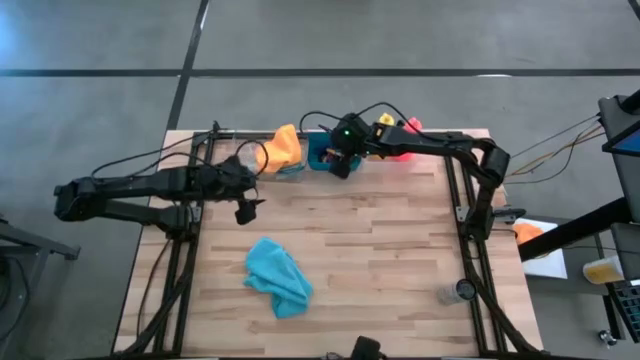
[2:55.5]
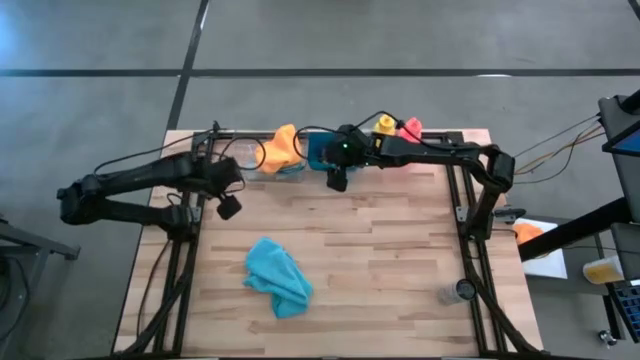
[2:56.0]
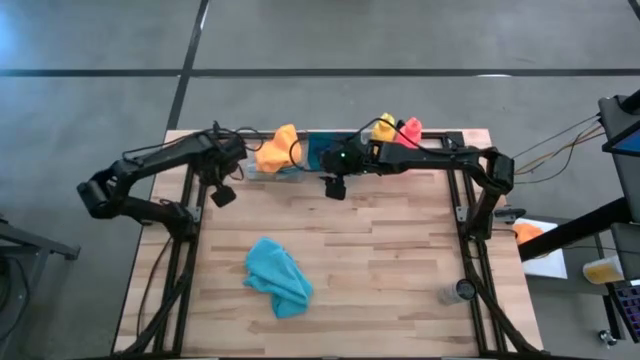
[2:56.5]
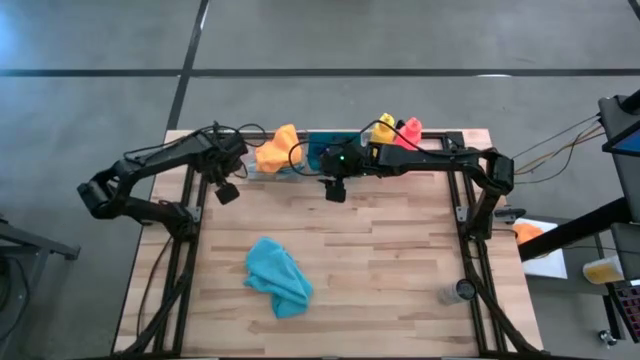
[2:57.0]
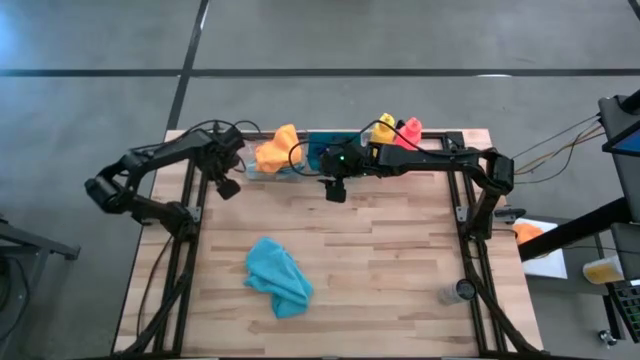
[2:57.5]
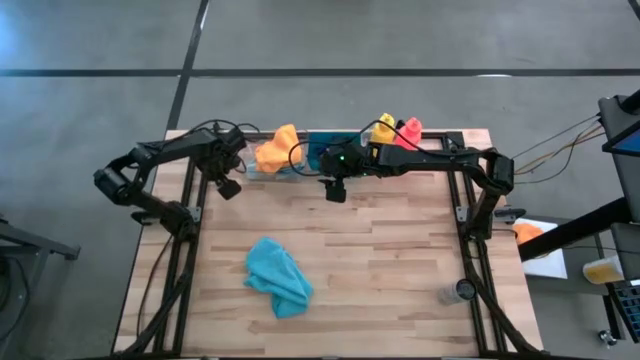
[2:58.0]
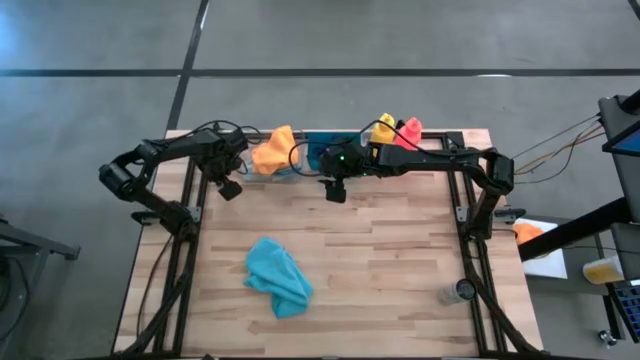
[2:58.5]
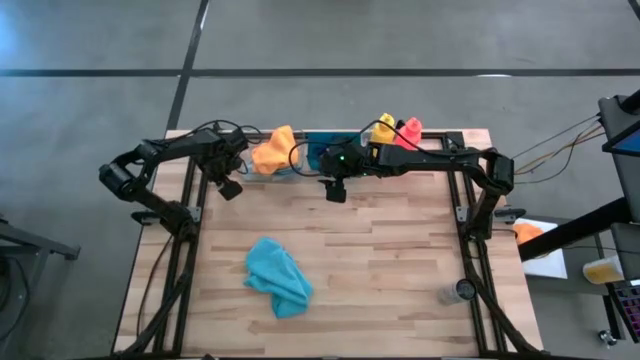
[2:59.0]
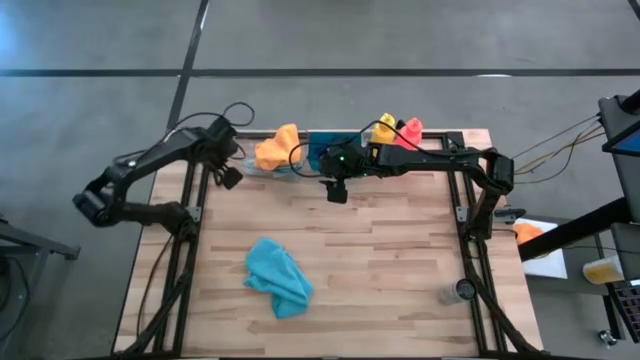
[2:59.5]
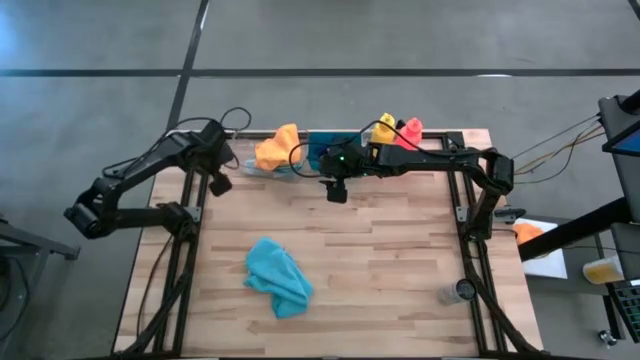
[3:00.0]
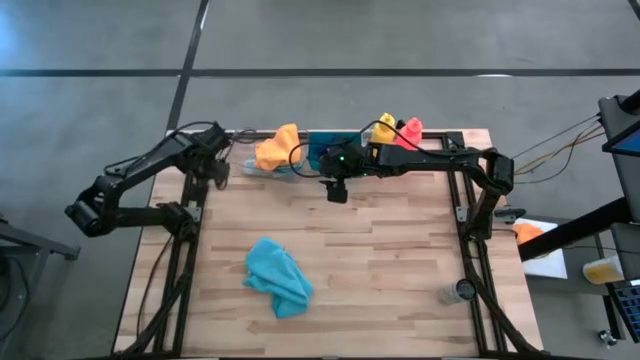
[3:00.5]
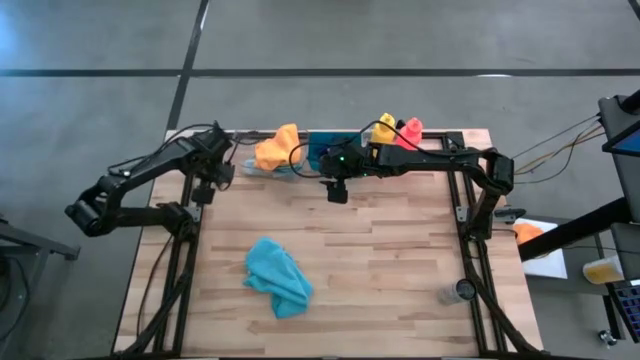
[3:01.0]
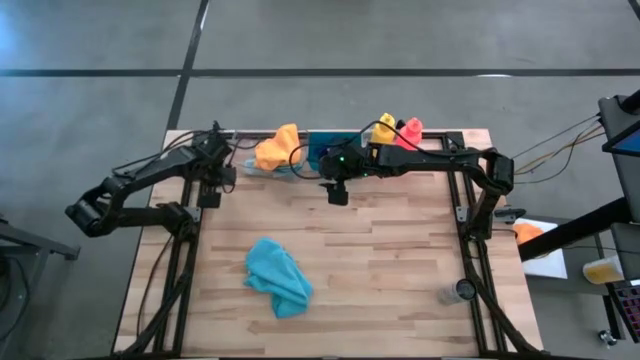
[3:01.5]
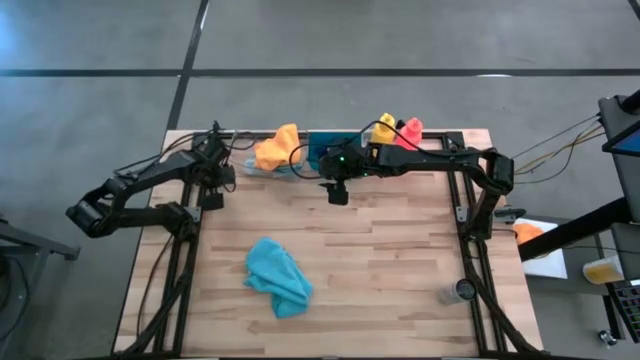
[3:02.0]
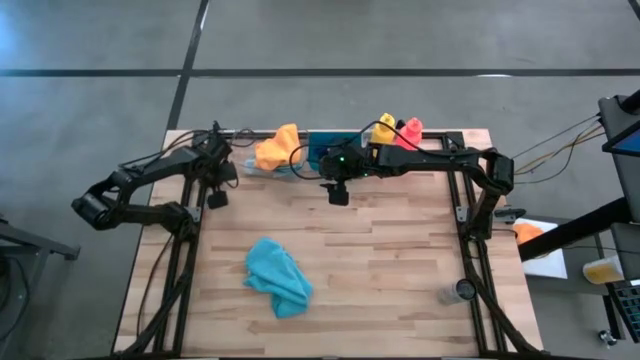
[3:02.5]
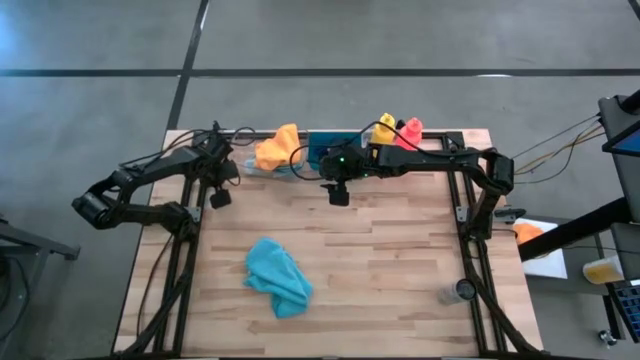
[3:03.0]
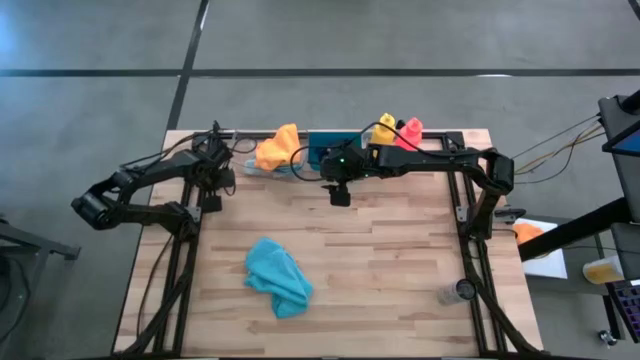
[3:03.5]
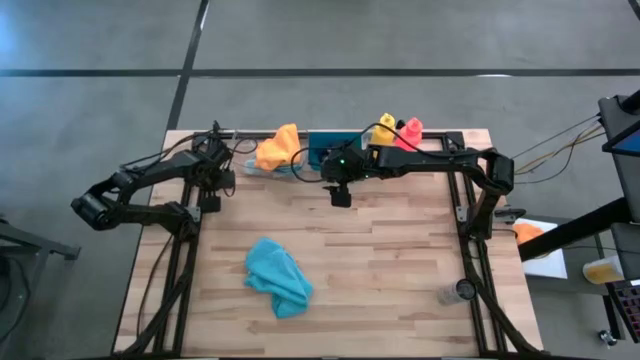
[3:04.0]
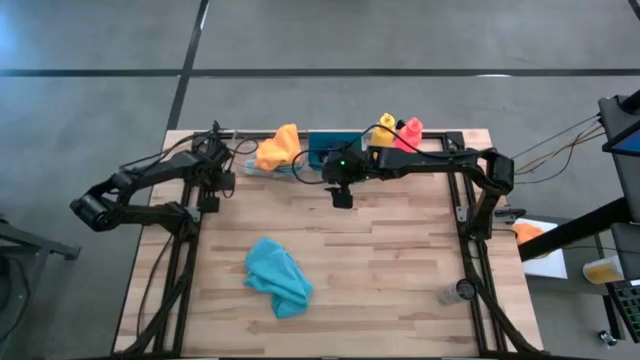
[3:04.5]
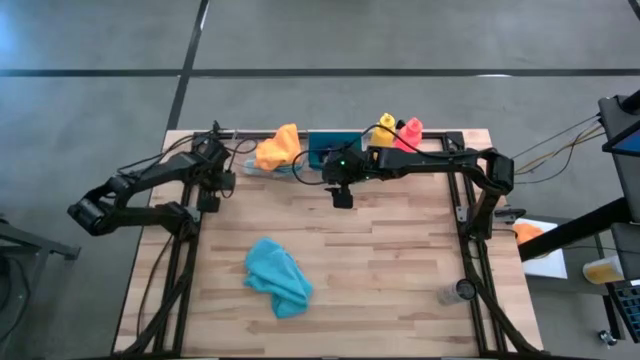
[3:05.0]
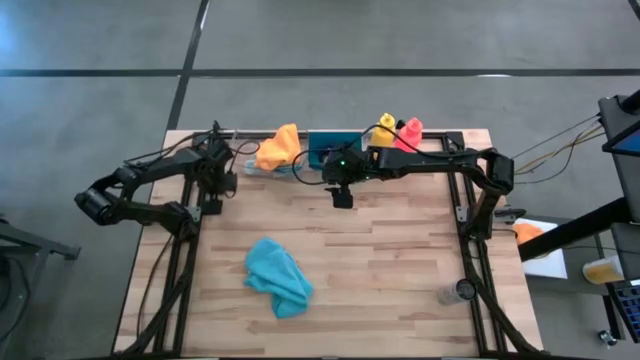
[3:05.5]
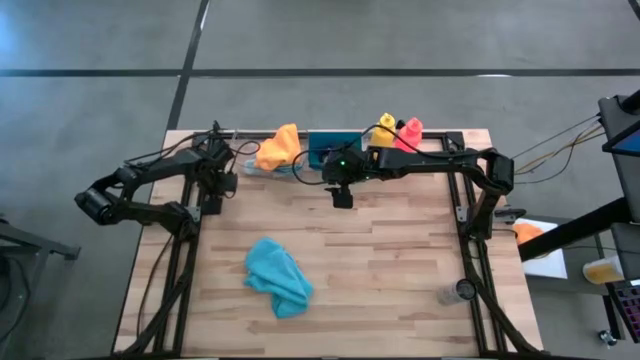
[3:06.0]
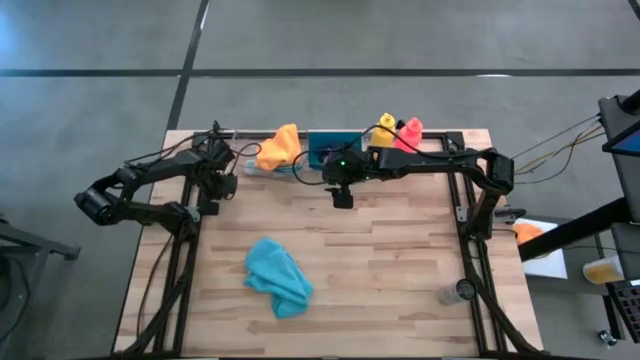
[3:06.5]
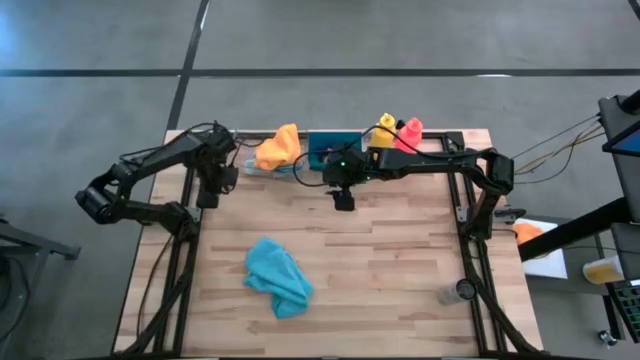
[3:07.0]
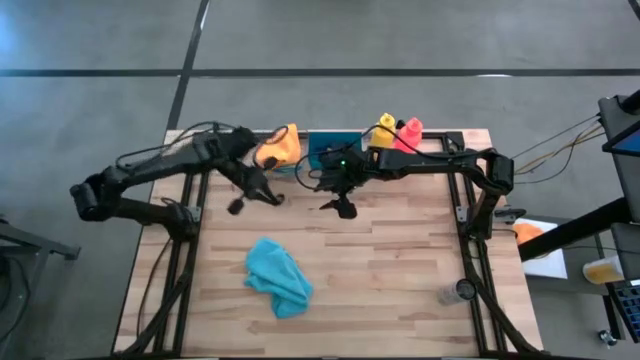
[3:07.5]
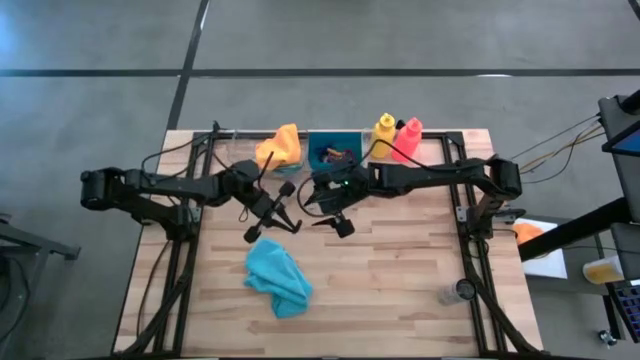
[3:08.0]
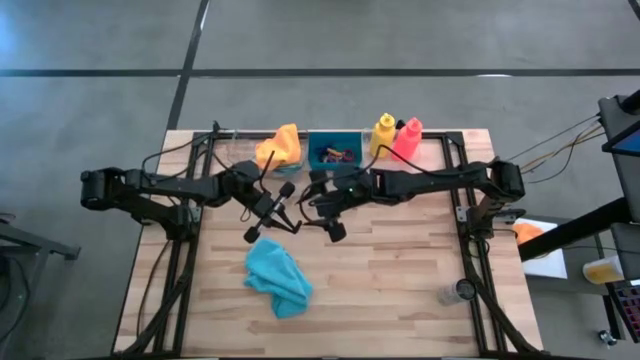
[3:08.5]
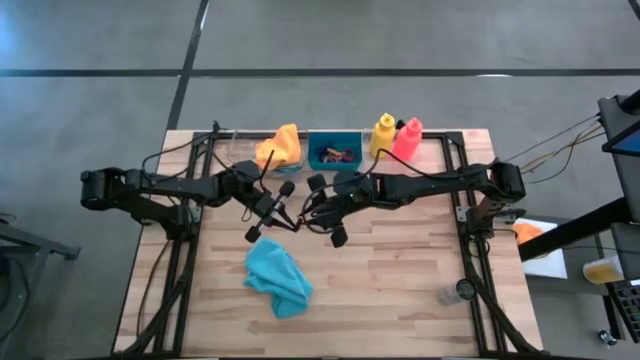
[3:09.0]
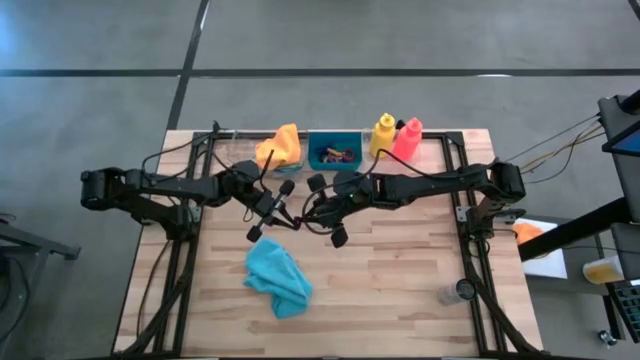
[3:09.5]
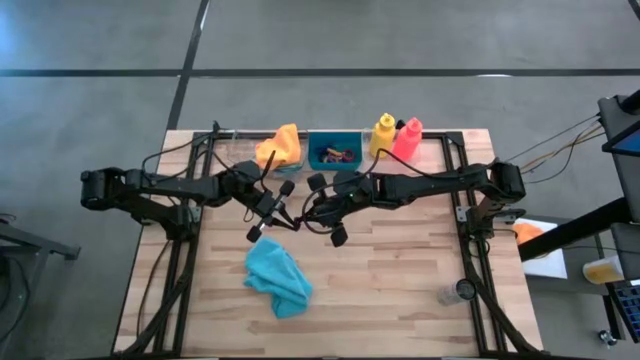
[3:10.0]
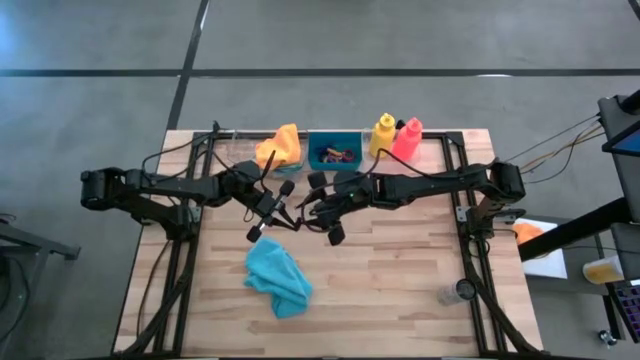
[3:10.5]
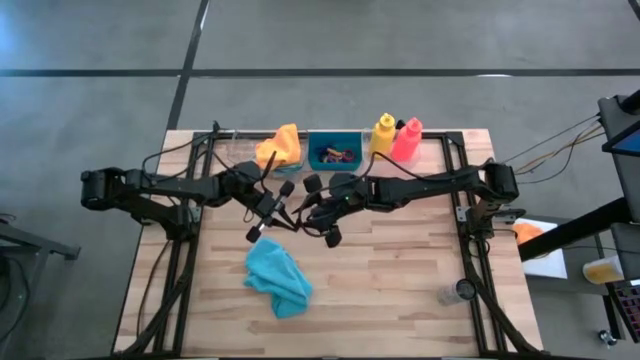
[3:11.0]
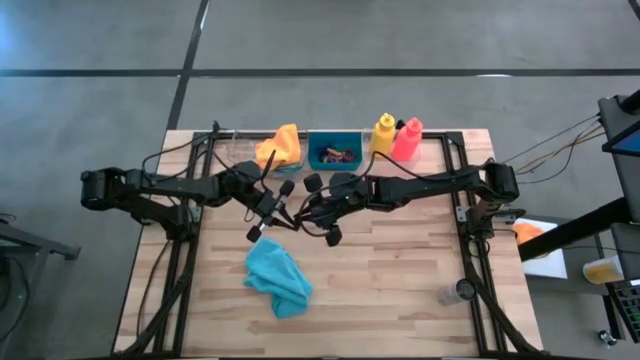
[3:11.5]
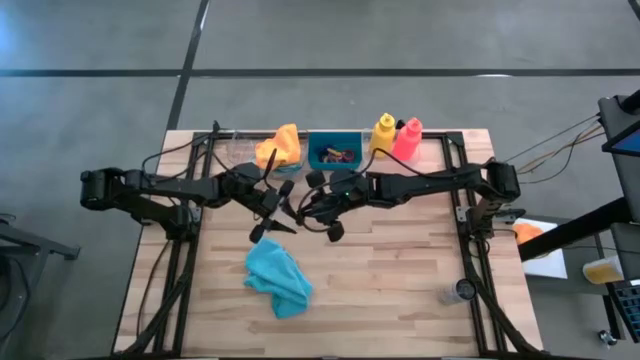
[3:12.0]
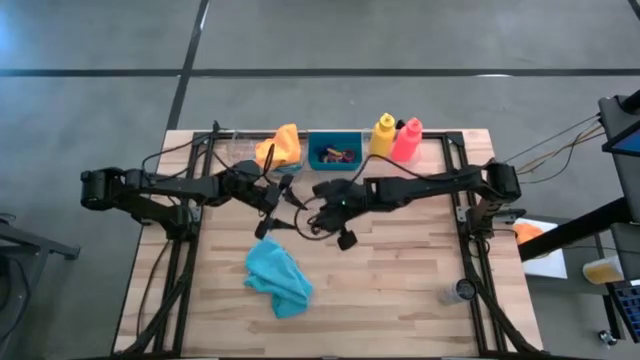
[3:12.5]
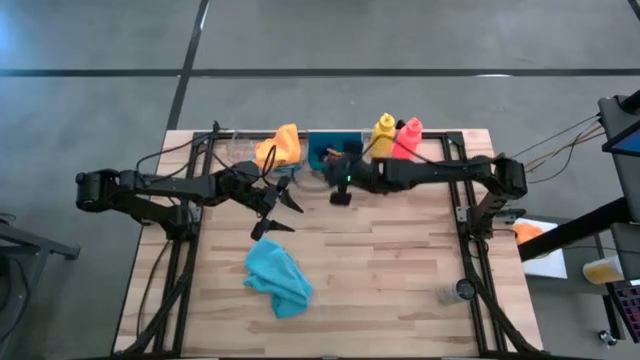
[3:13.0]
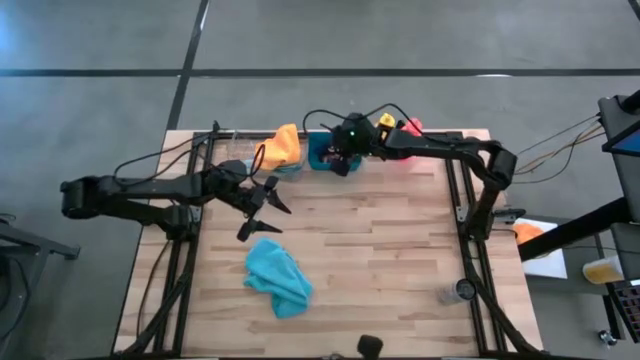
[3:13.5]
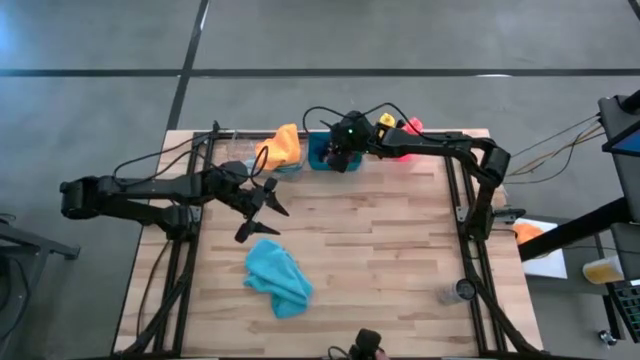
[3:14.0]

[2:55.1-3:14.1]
Task: Pick & Place Sports Items
Put the black spring keychain into the blue bin

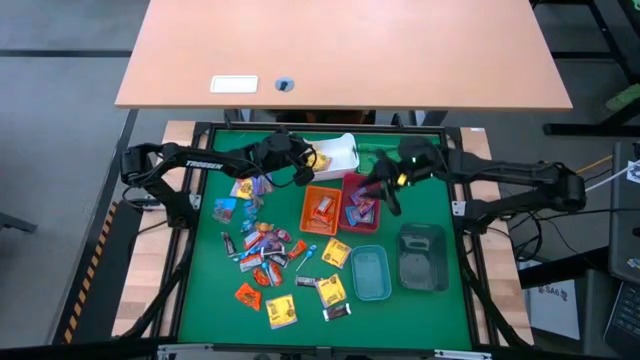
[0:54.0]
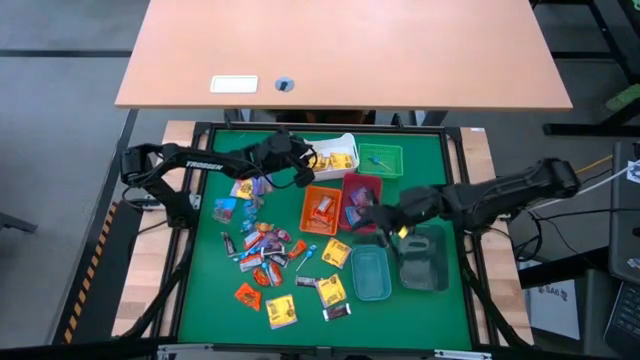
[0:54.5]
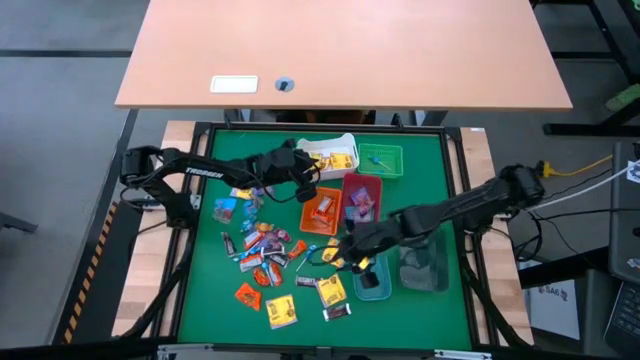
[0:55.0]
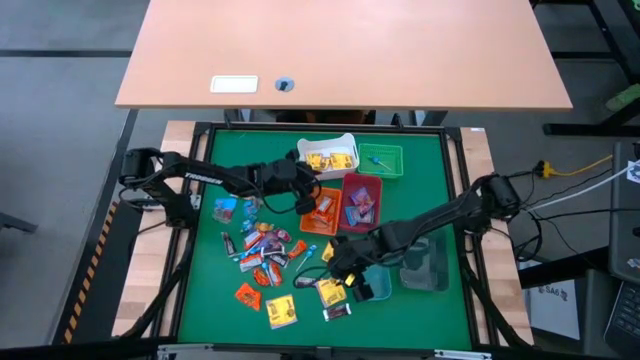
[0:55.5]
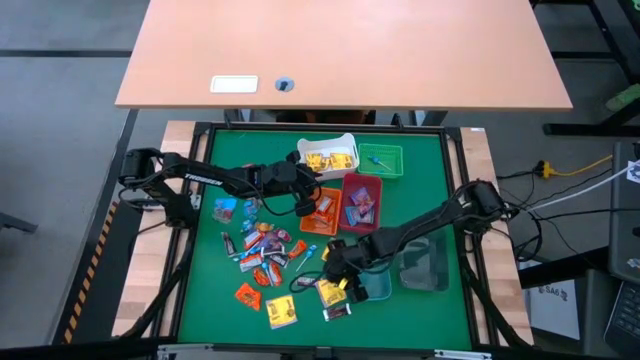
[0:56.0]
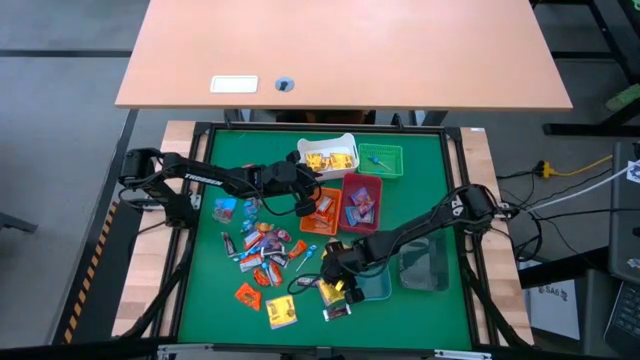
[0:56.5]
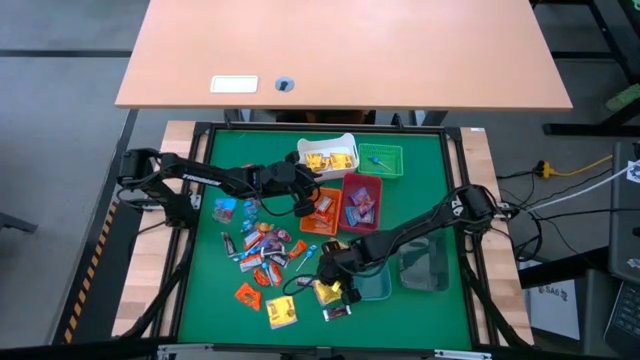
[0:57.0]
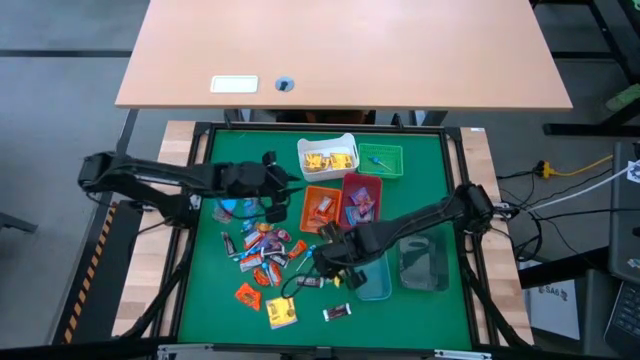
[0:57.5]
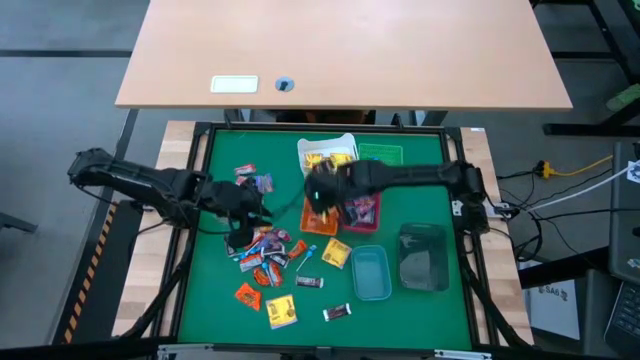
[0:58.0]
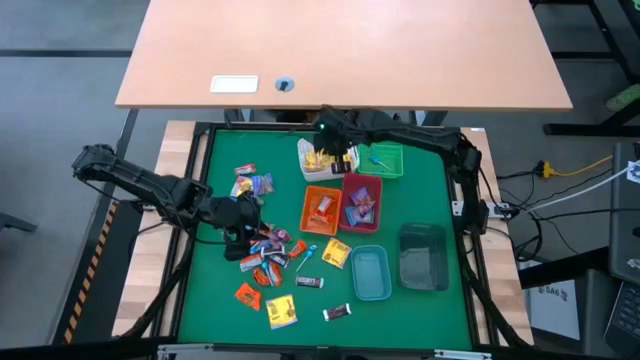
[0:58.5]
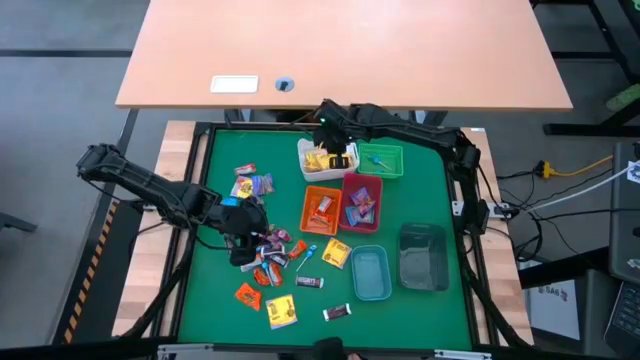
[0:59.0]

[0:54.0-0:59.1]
Task: Sort candy
Put the yellow bag of candy into the white bin
